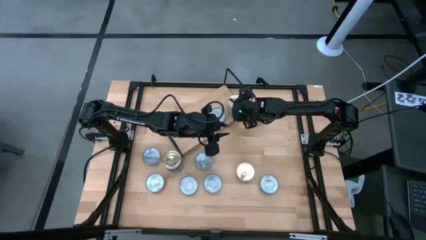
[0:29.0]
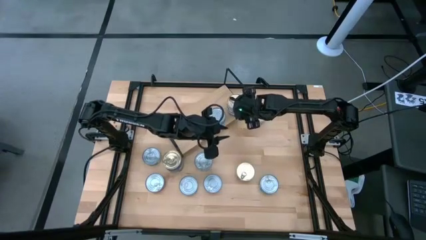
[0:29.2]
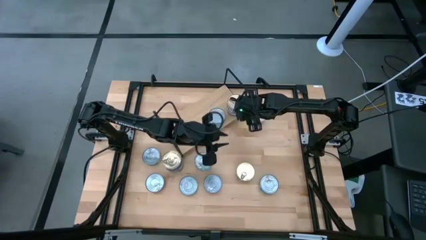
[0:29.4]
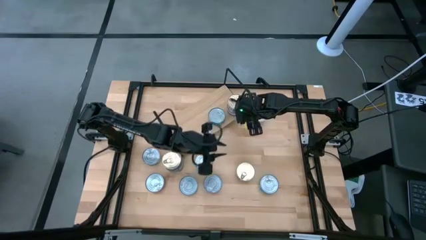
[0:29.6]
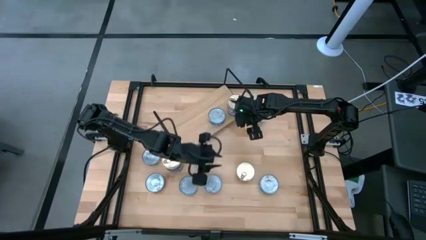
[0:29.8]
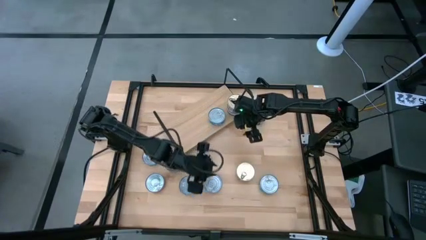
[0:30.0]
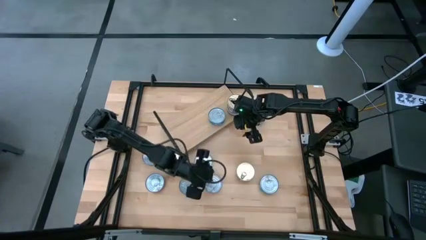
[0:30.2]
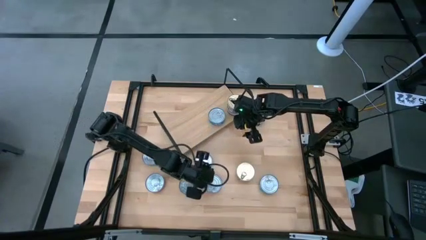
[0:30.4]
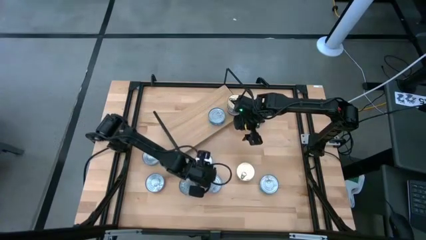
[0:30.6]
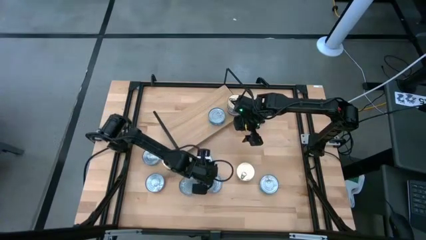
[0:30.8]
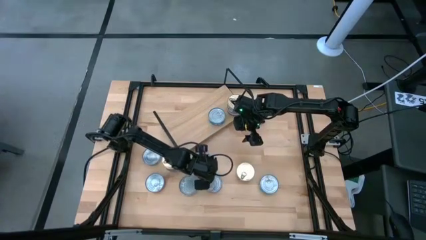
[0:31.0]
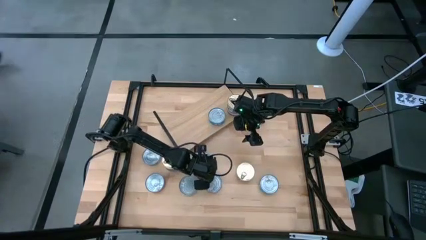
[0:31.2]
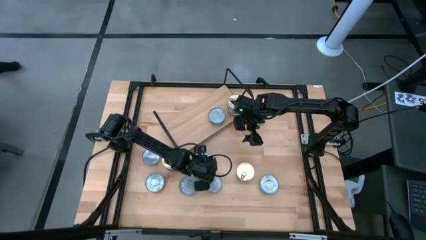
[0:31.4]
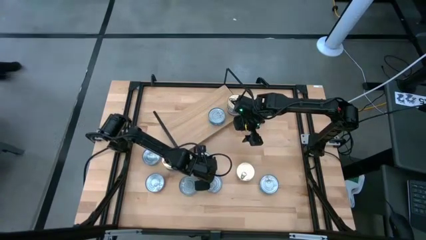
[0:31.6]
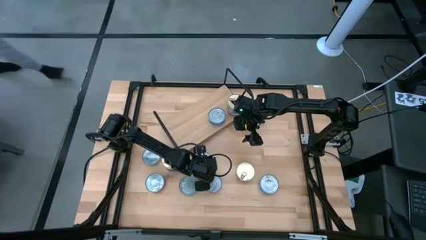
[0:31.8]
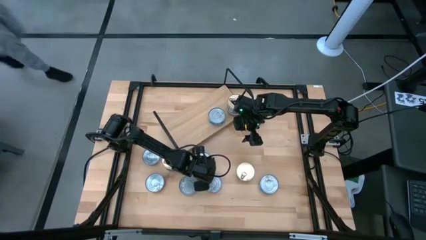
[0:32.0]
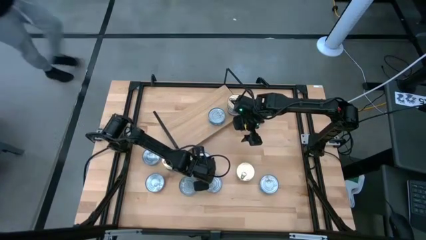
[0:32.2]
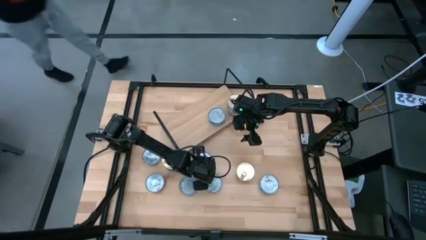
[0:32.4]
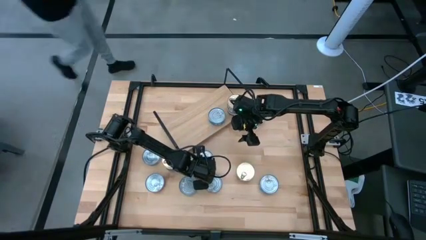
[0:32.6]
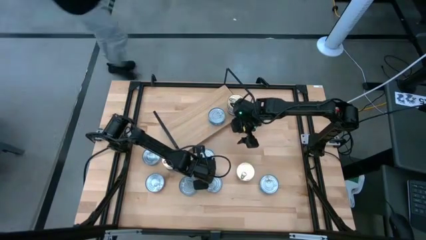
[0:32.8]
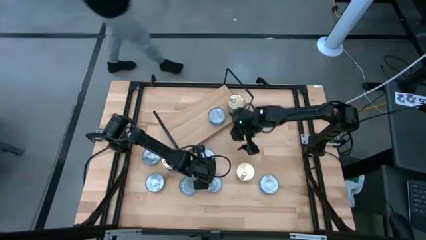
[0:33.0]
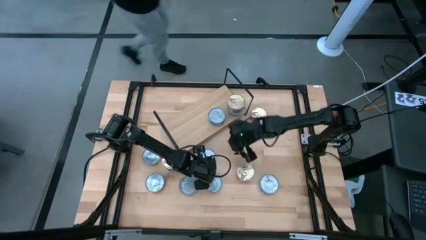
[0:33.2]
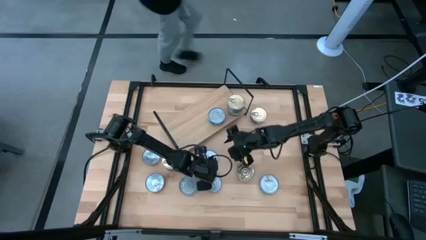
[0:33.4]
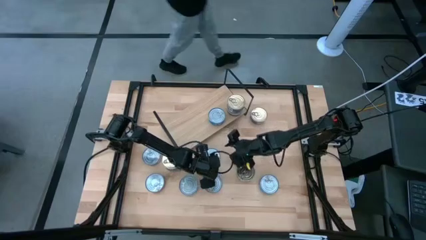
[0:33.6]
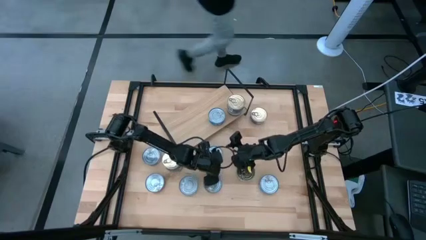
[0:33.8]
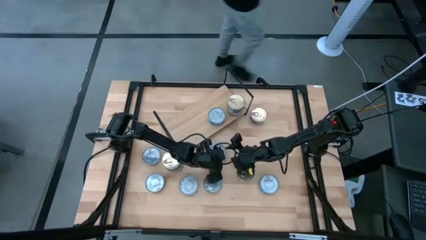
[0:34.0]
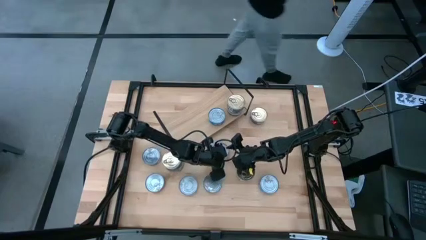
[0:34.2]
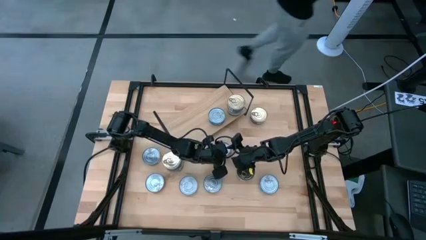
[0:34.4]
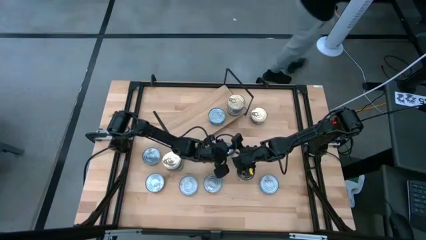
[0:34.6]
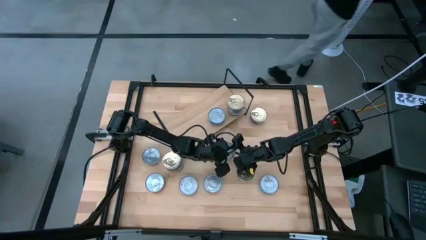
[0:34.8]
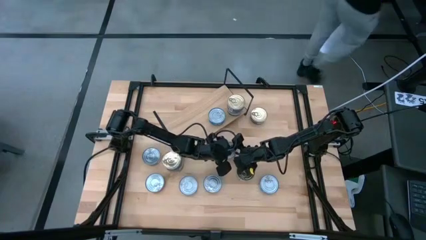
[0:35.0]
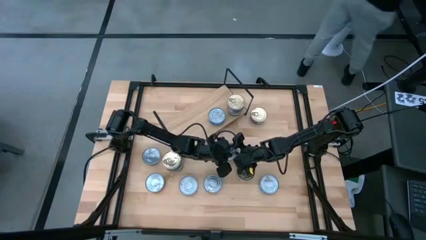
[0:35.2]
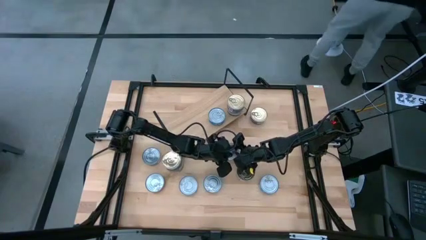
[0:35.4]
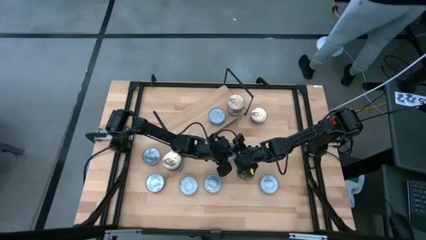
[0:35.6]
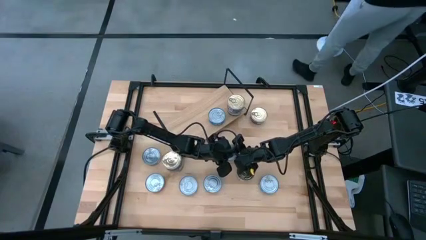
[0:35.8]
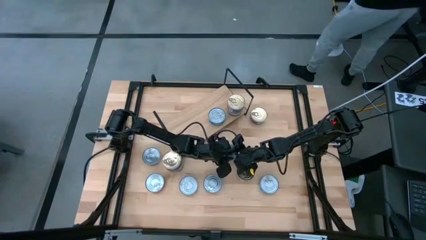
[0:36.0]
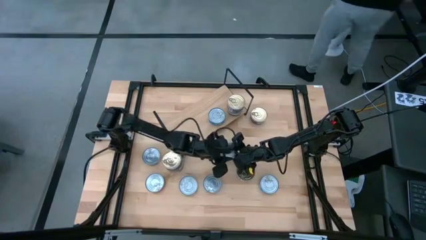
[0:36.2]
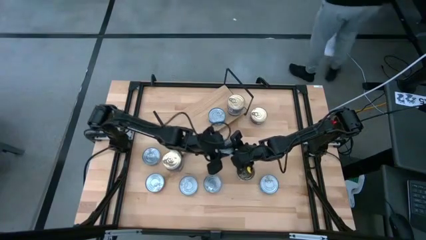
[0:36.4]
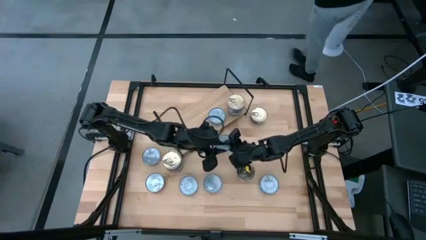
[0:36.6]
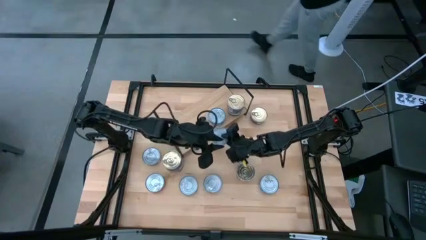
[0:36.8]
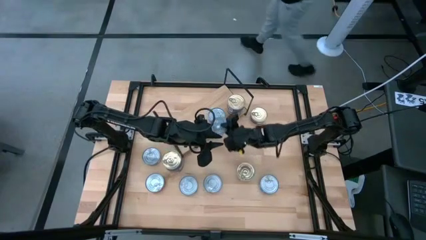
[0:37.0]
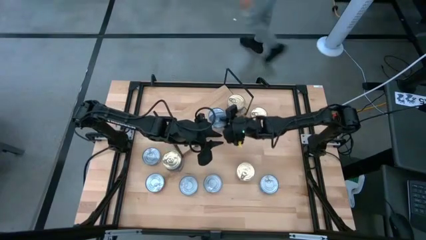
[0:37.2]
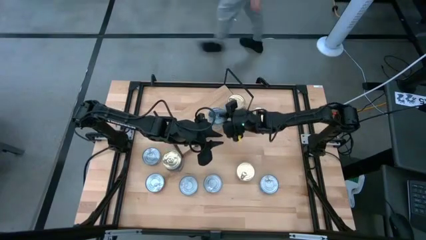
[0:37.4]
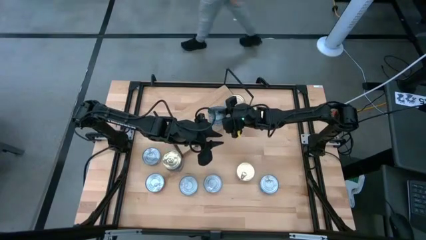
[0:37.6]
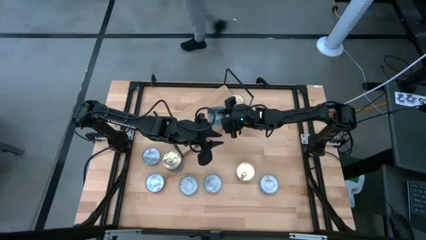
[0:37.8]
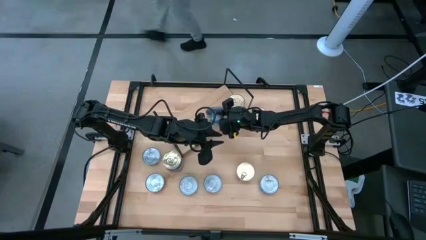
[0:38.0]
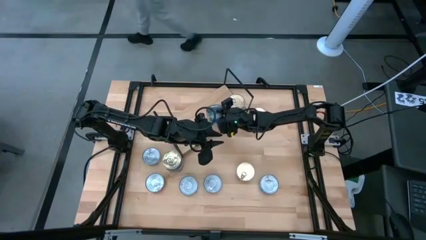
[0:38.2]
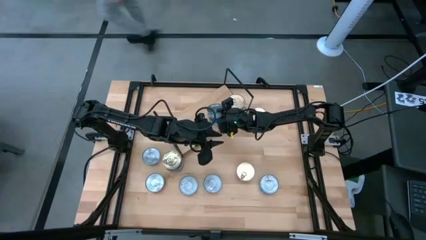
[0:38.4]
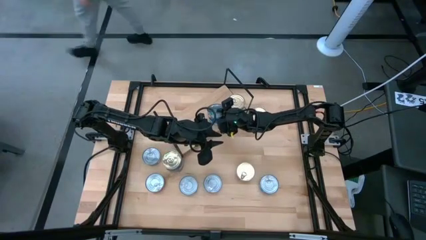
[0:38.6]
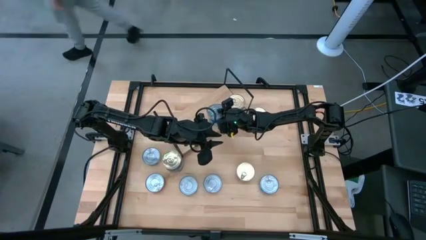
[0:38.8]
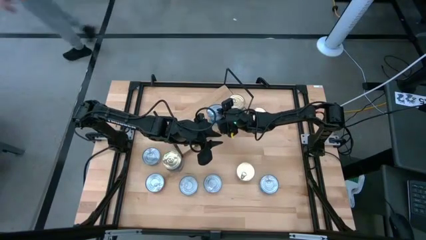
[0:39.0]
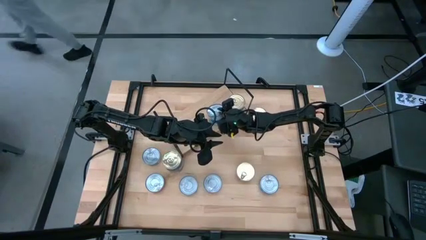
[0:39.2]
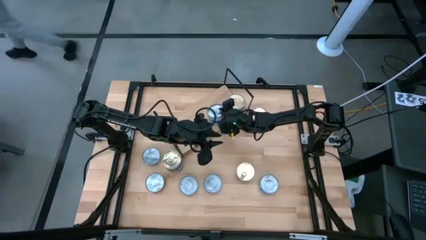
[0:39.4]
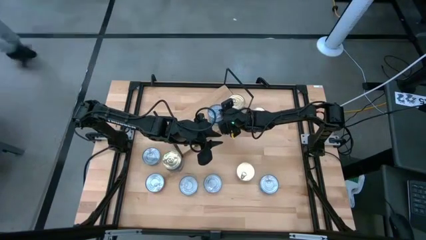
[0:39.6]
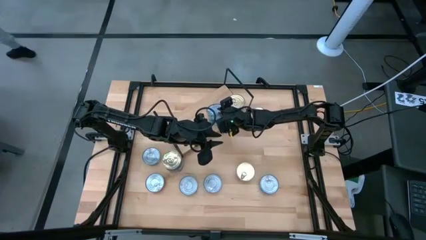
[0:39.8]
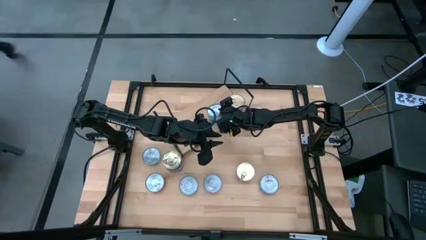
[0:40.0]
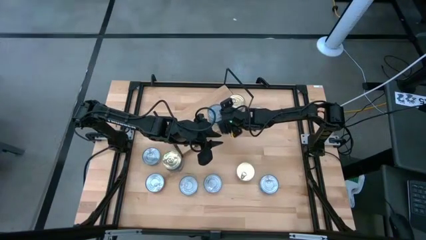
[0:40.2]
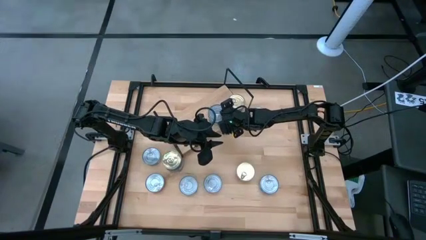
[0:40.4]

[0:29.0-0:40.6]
Task: Stack canned seafood by type on shelf
Stack the yellow blue tuna can on top of the yellow blue tuna can on the shelf

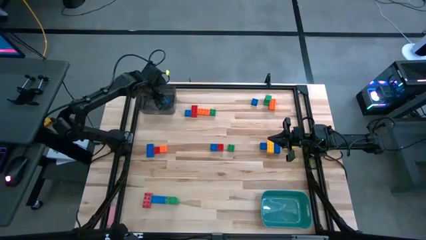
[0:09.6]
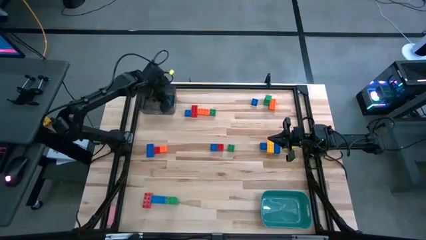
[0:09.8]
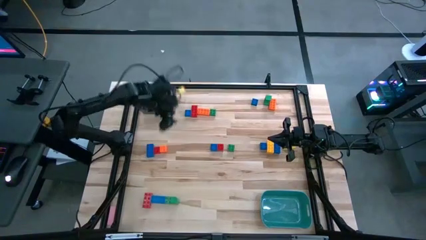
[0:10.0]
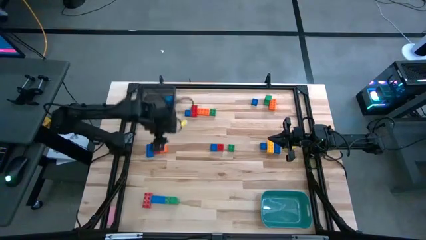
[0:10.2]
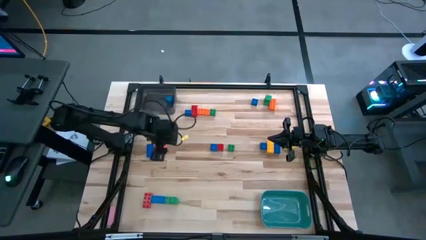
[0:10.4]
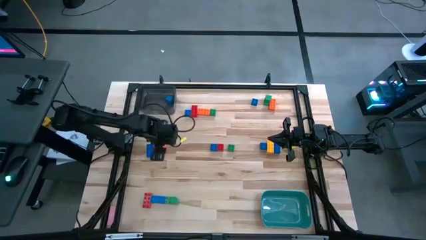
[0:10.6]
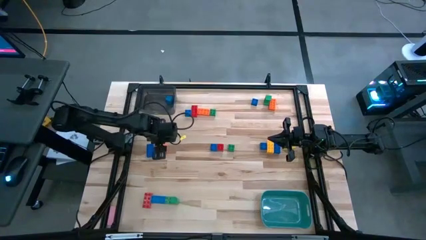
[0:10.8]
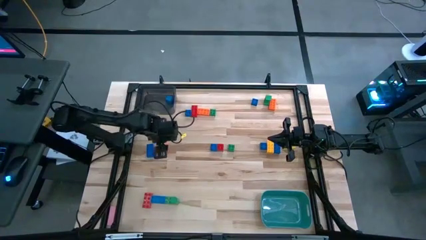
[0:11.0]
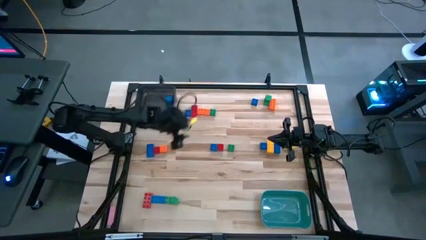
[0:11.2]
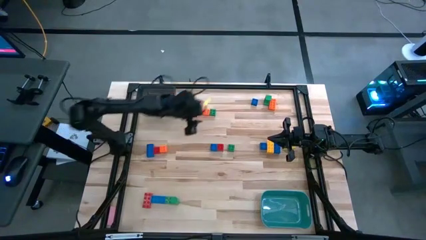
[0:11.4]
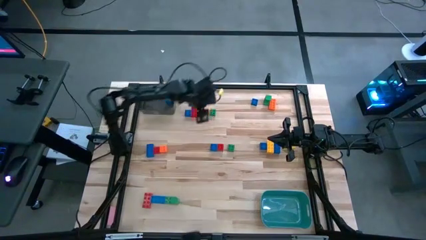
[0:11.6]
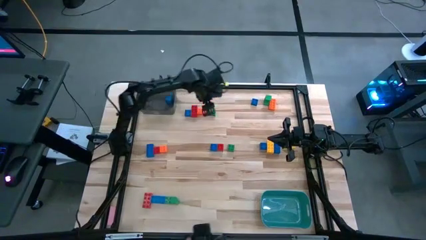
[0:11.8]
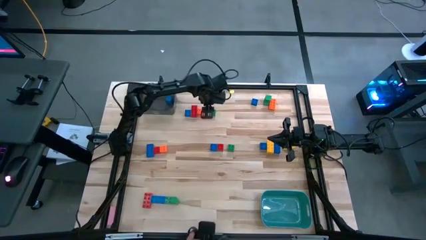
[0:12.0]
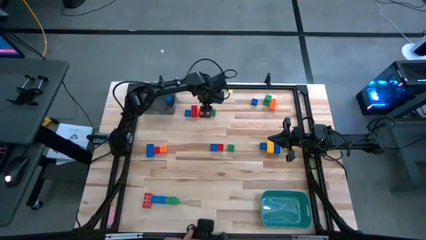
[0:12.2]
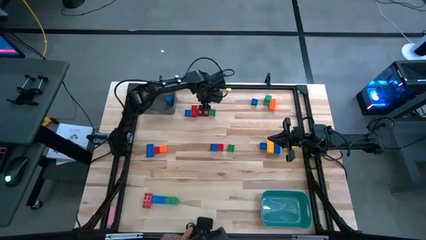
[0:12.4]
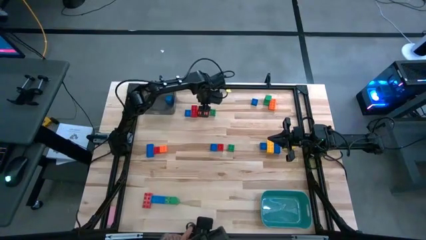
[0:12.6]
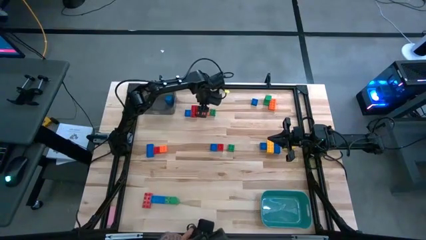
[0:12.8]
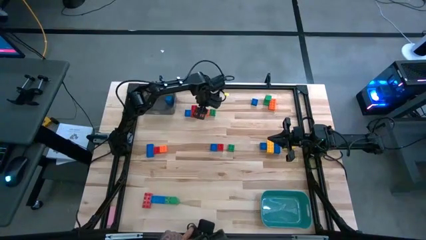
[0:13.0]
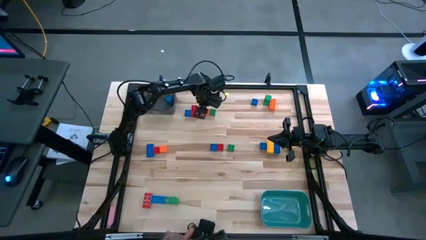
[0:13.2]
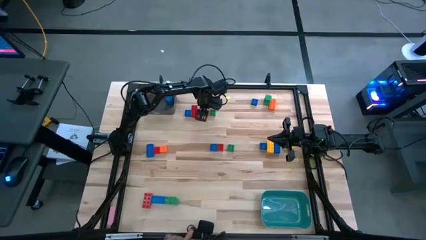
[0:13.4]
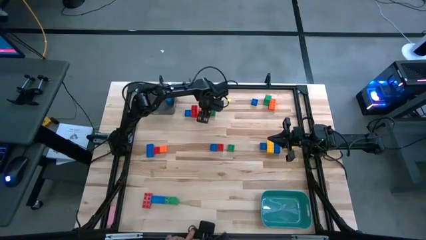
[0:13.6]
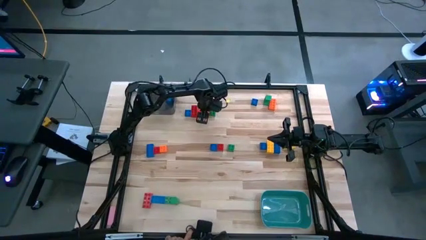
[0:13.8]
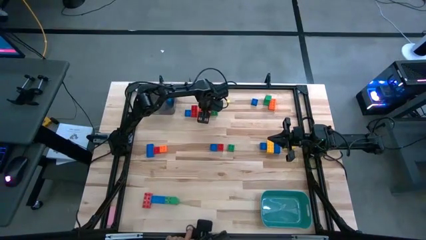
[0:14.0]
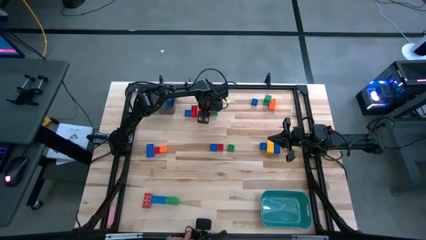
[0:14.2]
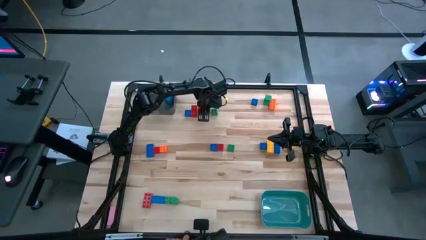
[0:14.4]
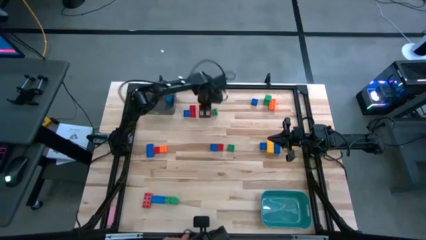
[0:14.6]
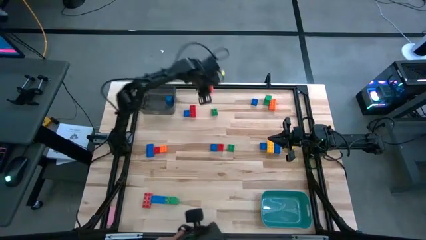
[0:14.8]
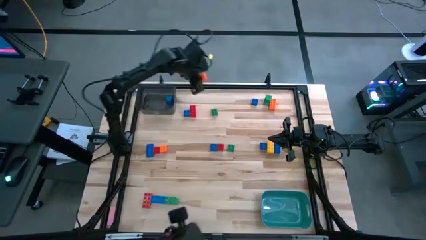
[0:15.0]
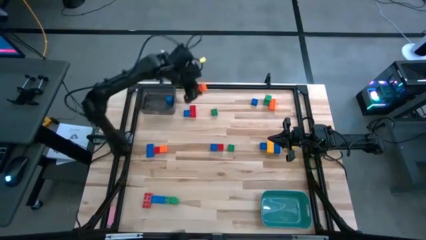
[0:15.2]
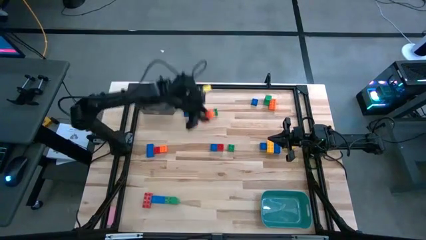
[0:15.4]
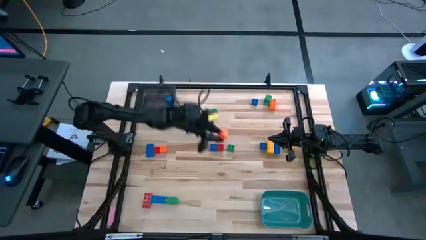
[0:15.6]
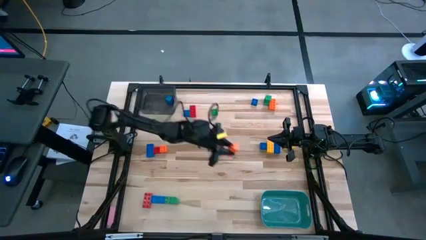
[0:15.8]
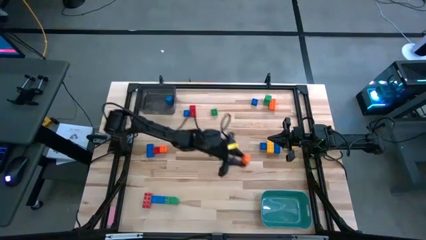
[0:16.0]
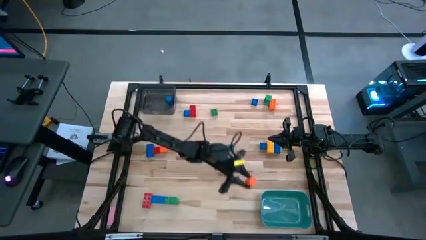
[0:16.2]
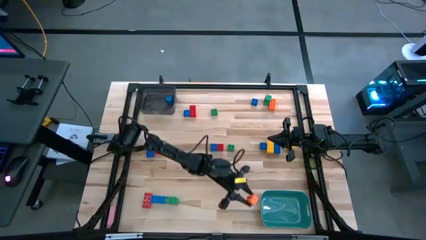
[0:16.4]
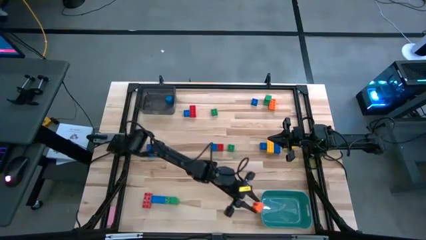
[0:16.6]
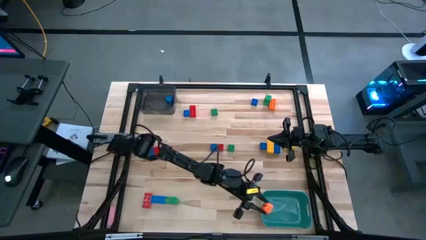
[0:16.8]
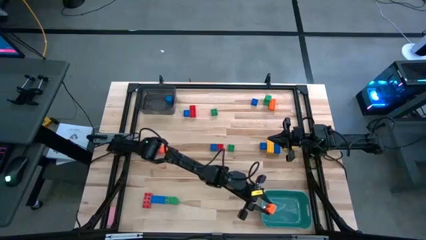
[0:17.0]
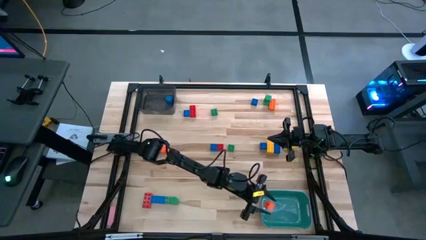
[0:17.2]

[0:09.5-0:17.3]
Task: Sort blocks by size
Put the top orange game piece into the blue bin
